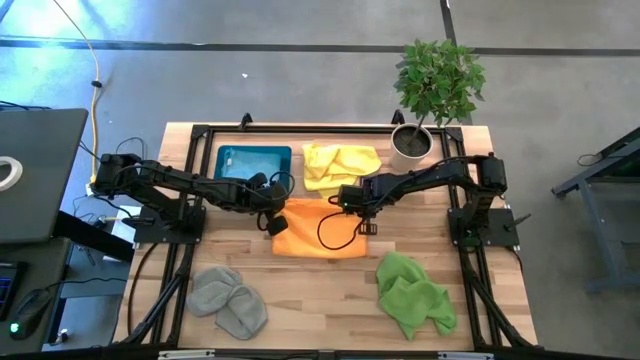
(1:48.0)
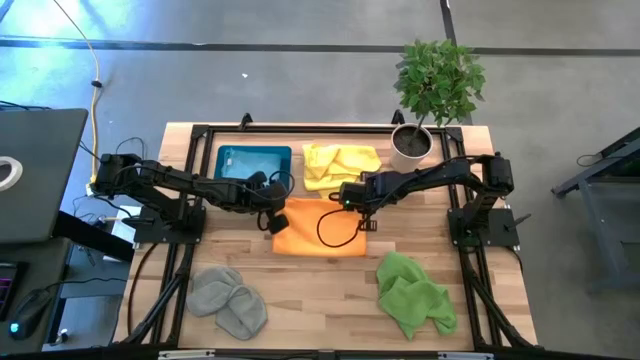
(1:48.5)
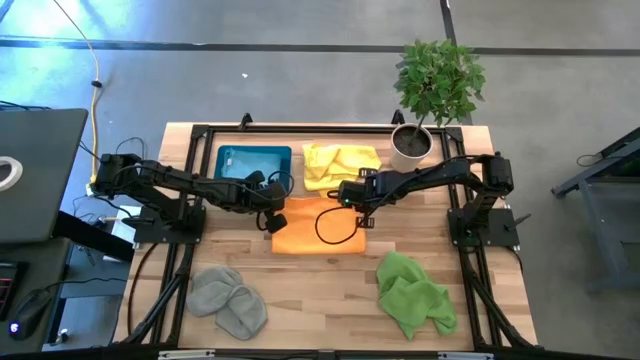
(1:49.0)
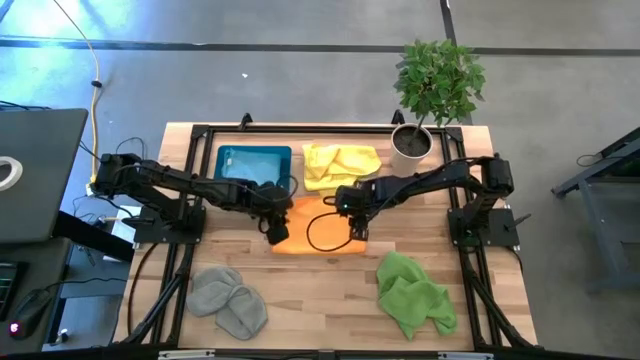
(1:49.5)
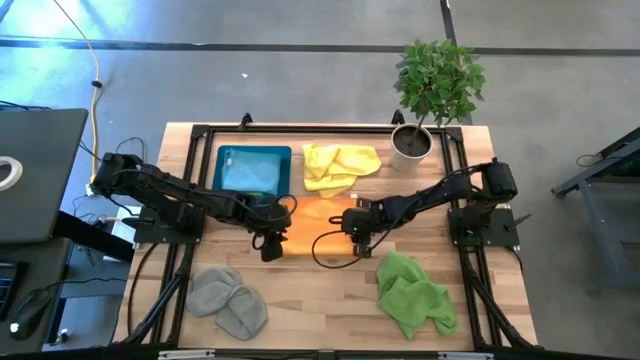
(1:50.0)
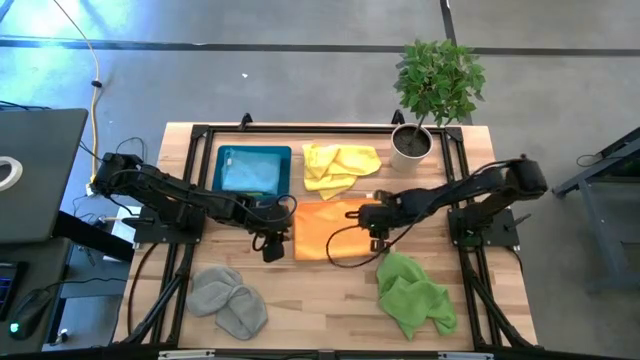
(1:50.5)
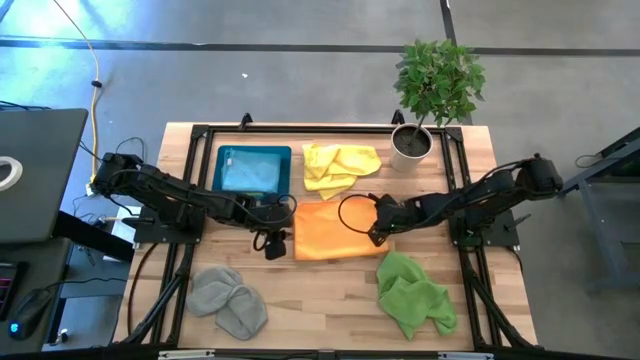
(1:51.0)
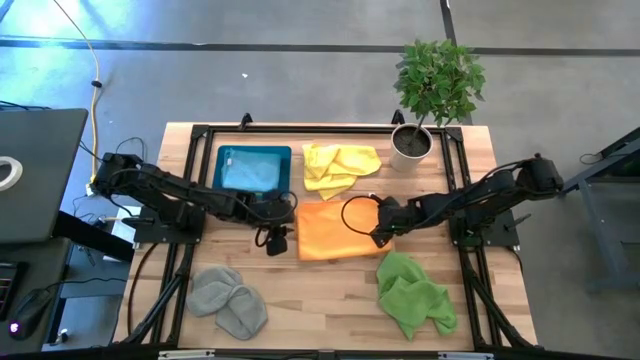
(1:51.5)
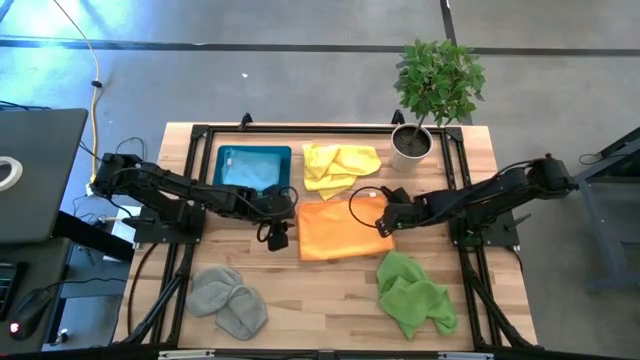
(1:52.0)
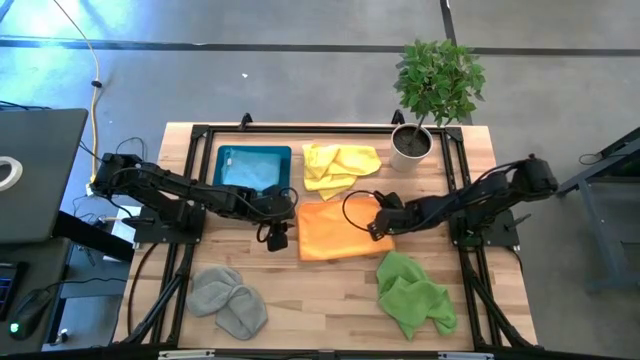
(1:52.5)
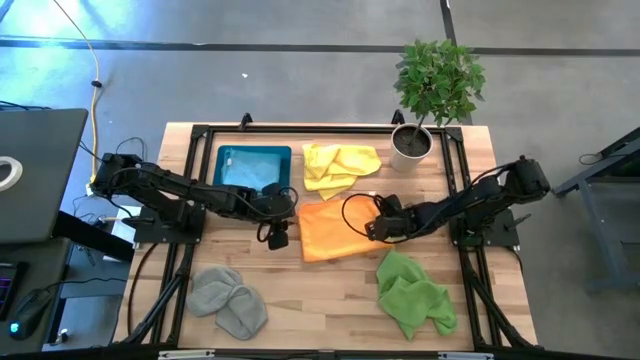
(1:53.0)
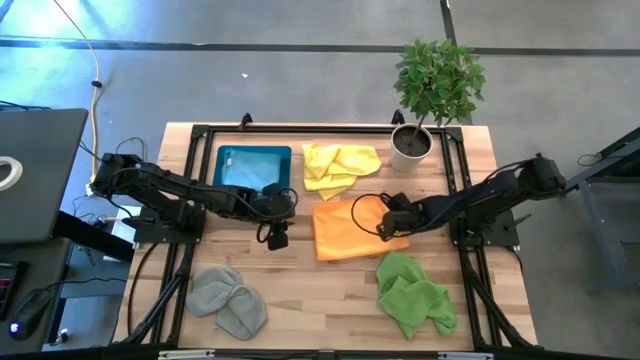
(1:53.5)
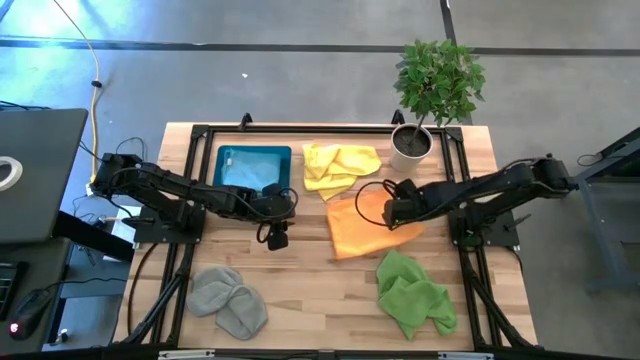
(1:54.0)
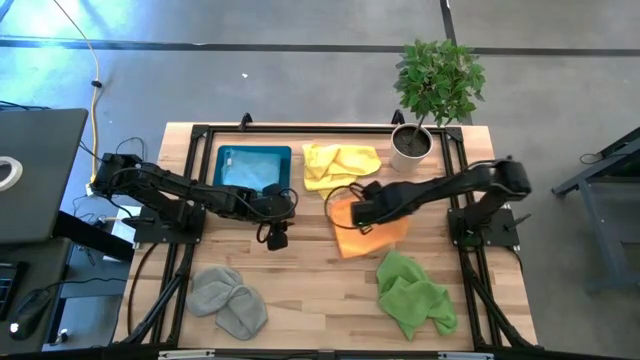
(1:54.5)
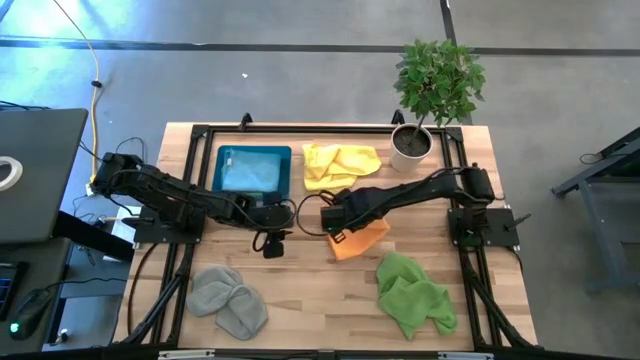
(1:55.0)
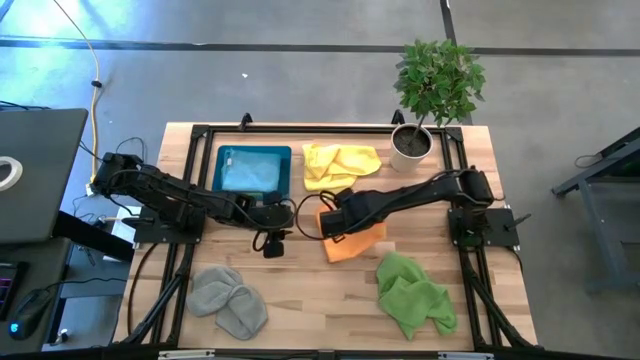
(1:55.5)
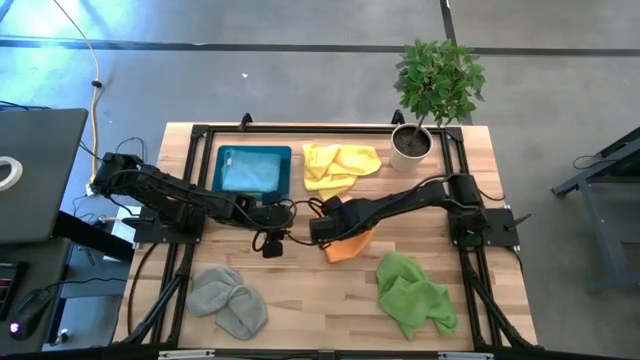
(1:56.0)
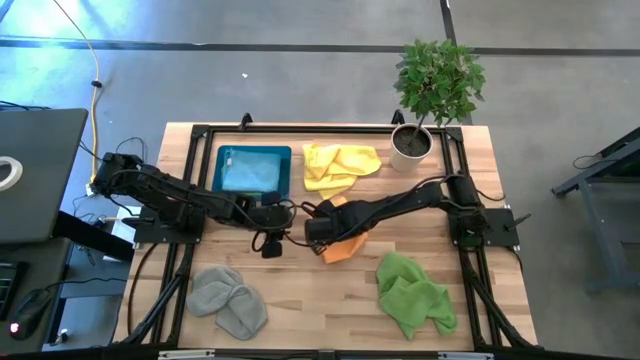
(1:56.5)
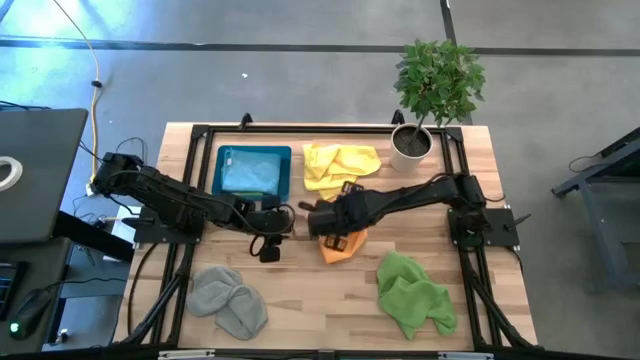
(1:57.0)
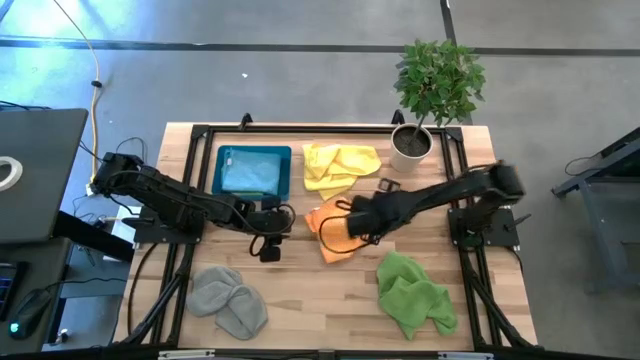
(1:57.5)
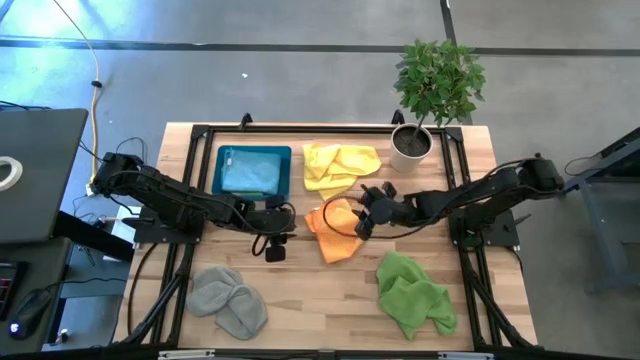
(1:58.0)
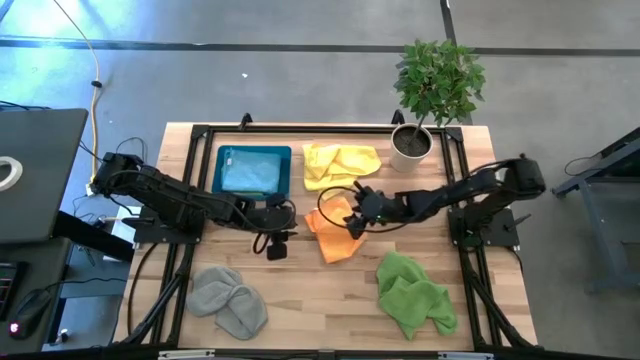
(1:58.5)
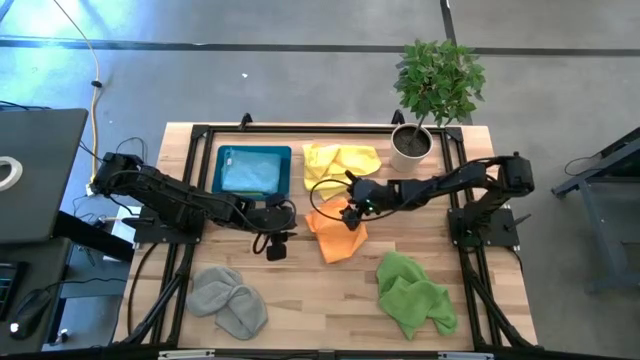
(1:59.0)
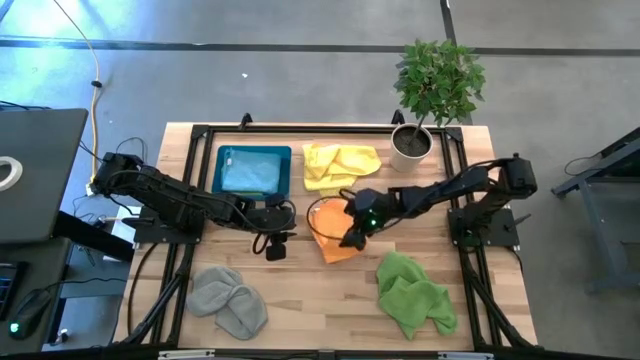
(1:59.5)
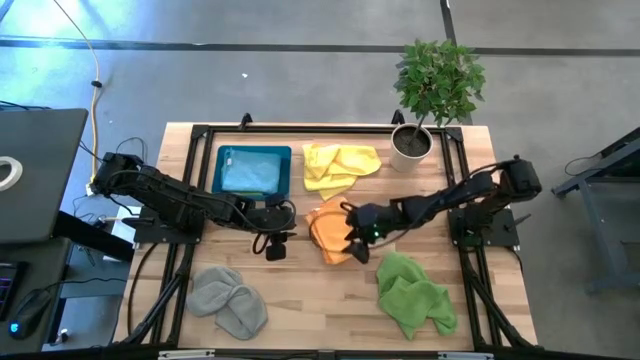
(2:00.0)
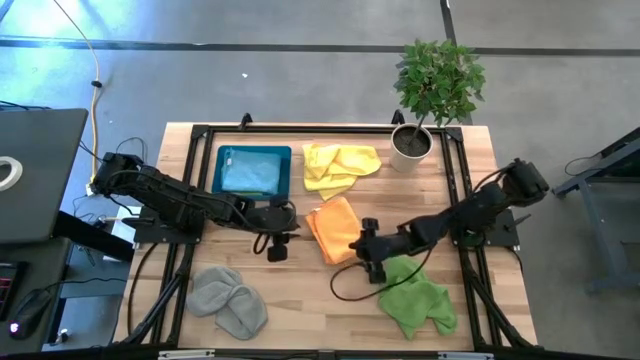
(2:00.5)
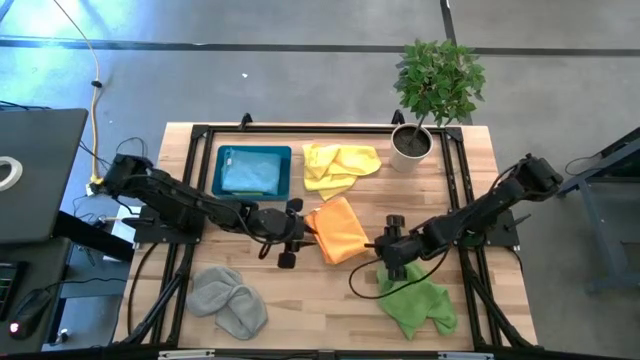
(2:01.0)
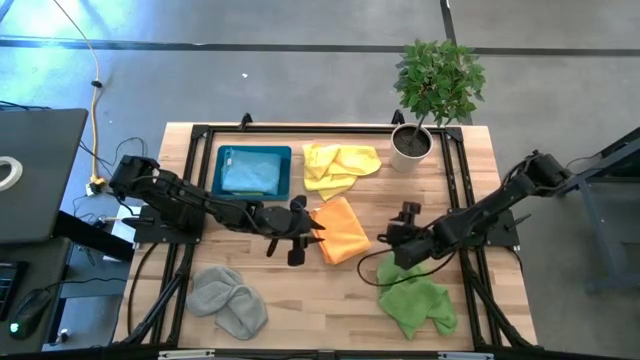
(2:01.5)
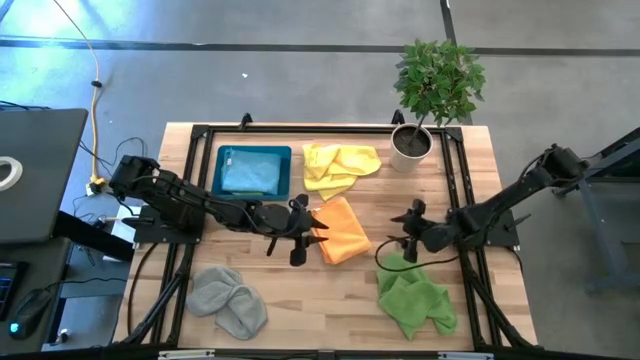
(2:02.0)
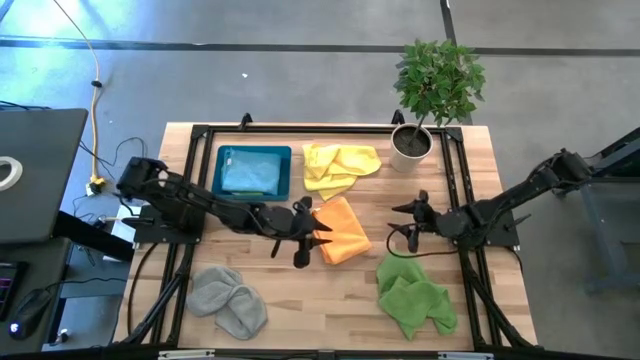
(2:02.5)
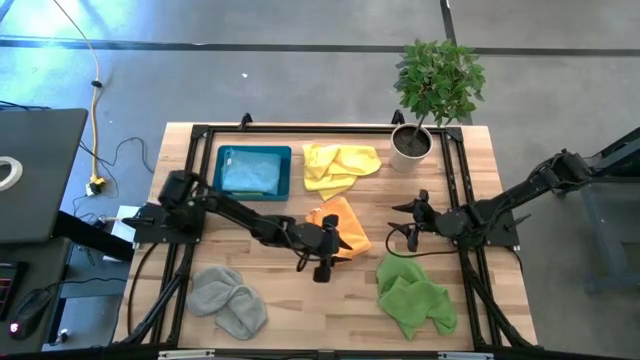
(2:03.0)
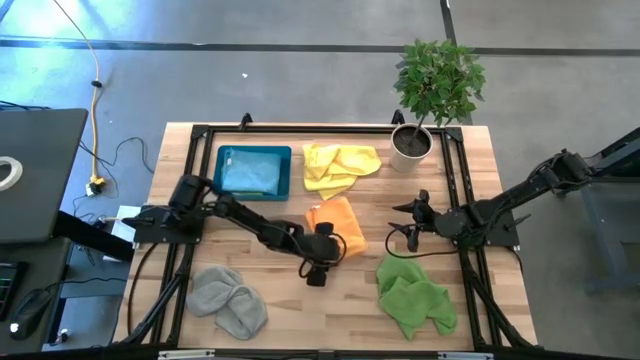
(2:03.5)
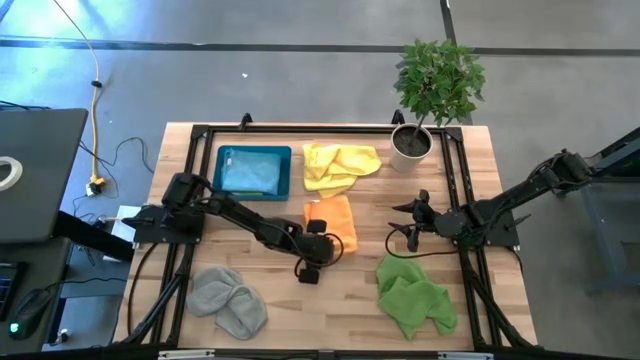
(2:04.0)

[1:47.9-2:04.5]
Task: Fold microfiber towels
Fold the orange microfiber cloth

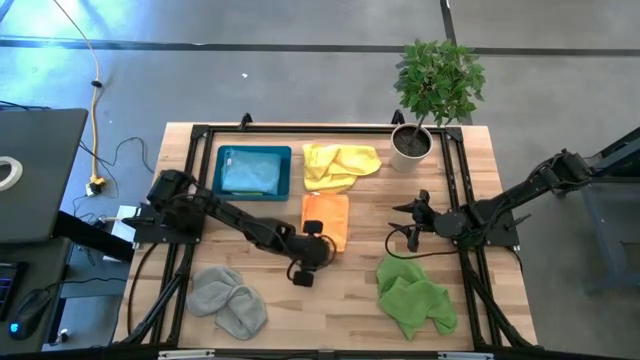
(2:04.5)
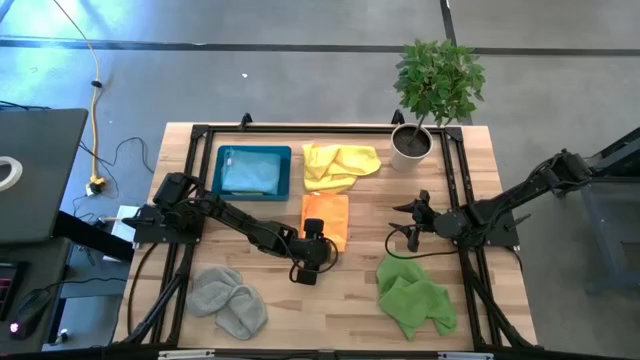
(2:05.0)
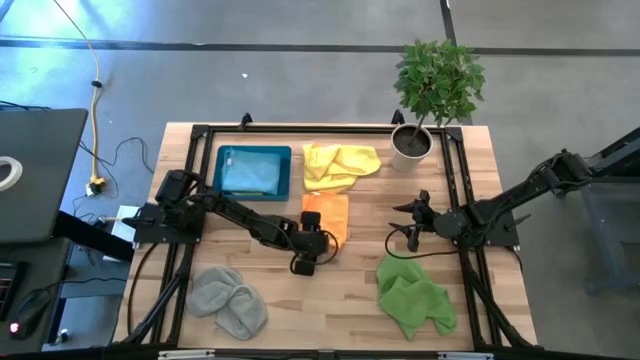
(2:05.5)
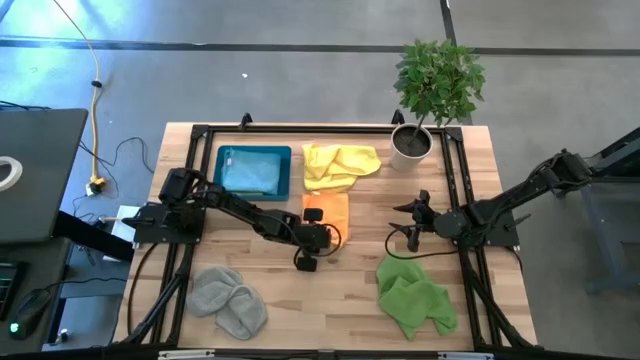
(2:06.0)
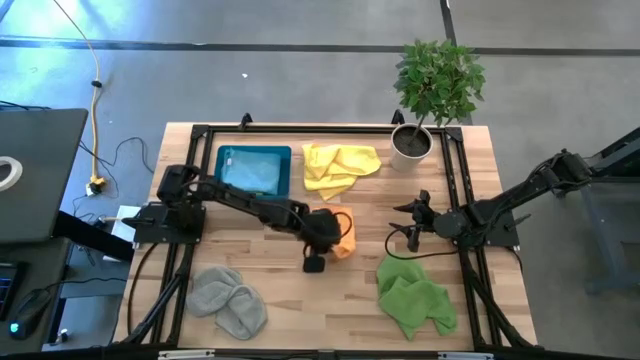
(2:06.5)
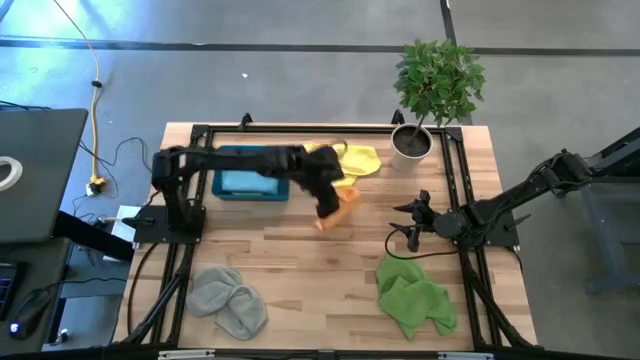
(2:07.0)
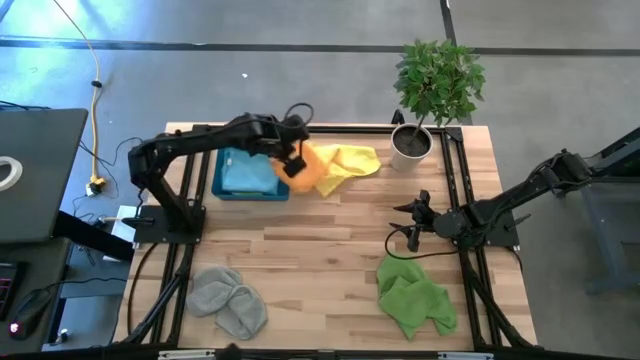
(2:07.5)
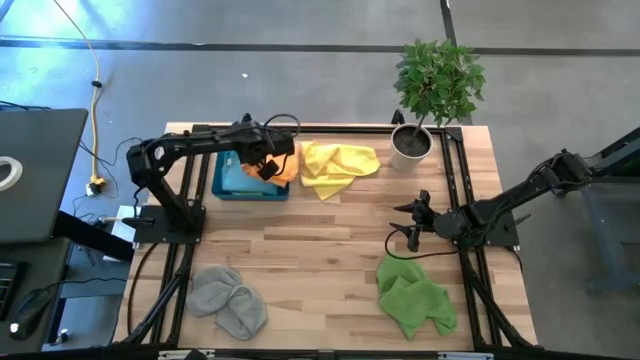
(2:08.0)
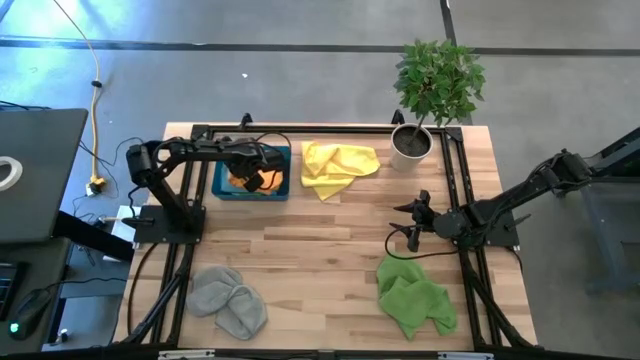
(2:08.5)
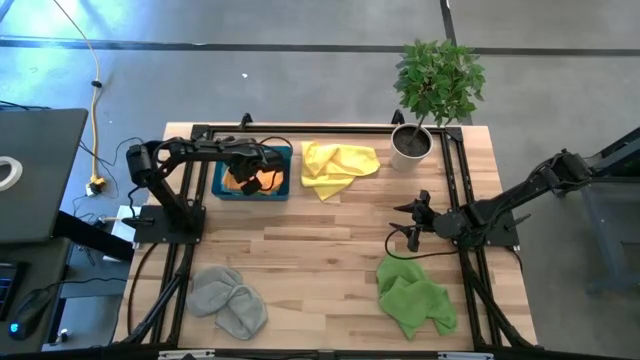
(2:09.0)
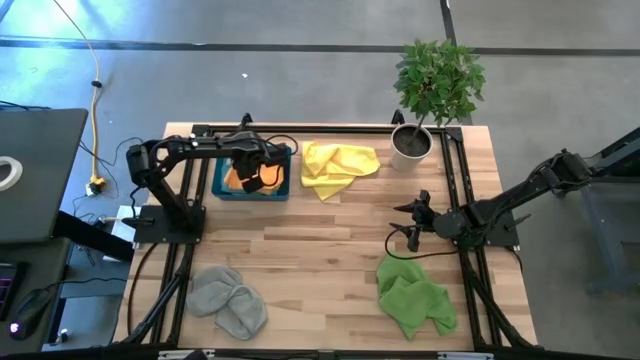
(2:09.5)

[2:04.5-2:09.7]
Put the folded orange microfiber cloth into the blue bin
